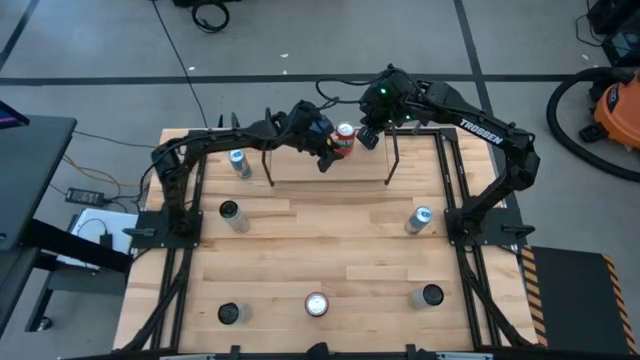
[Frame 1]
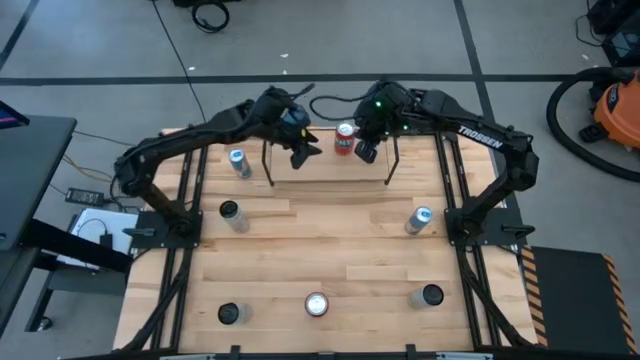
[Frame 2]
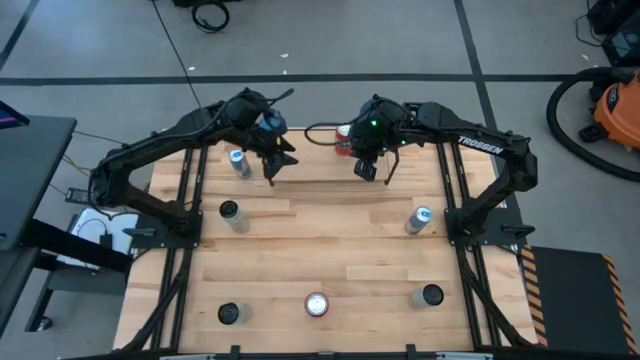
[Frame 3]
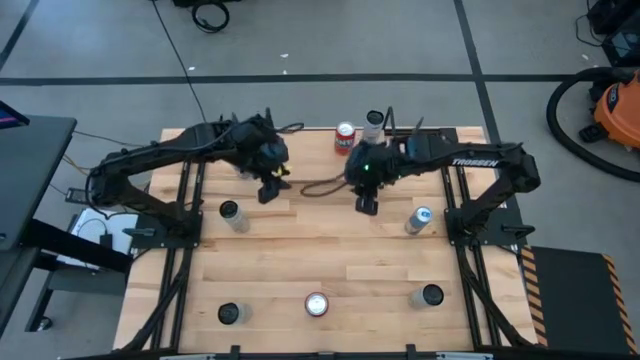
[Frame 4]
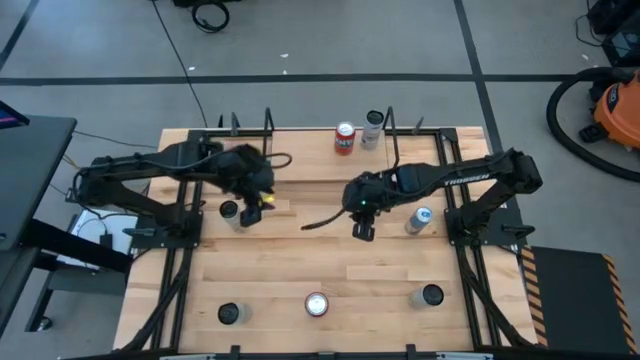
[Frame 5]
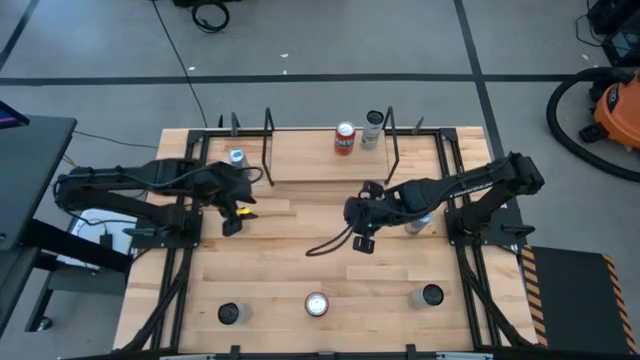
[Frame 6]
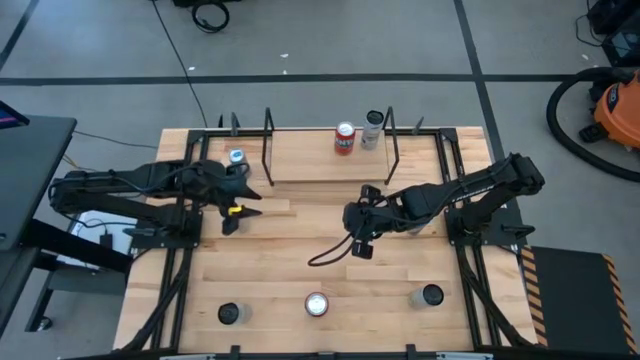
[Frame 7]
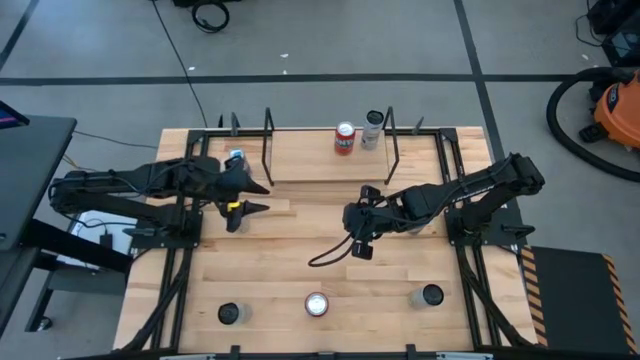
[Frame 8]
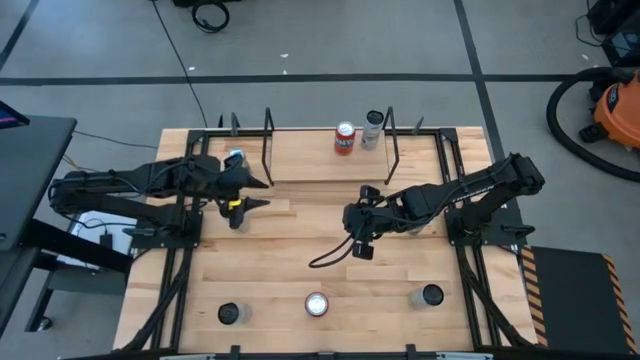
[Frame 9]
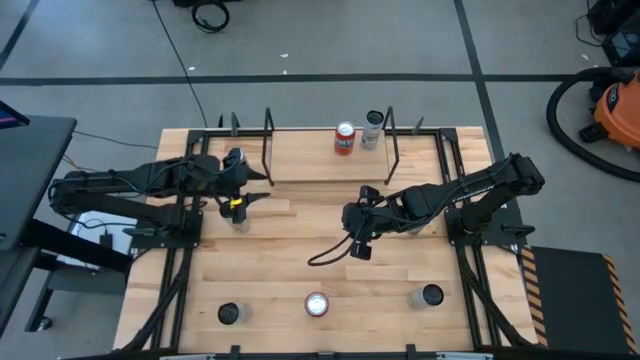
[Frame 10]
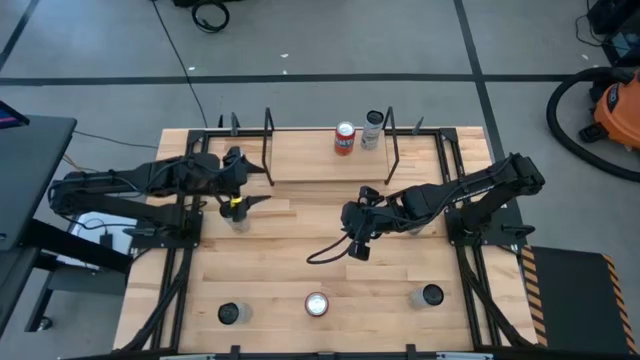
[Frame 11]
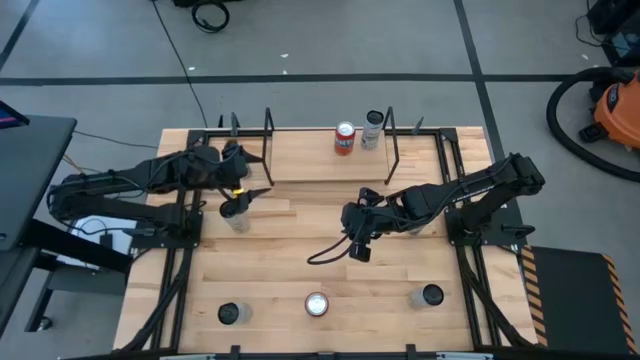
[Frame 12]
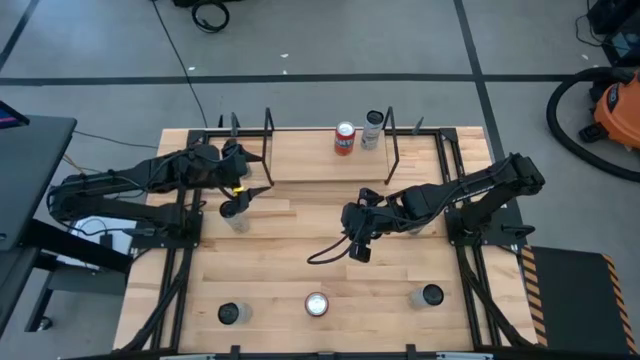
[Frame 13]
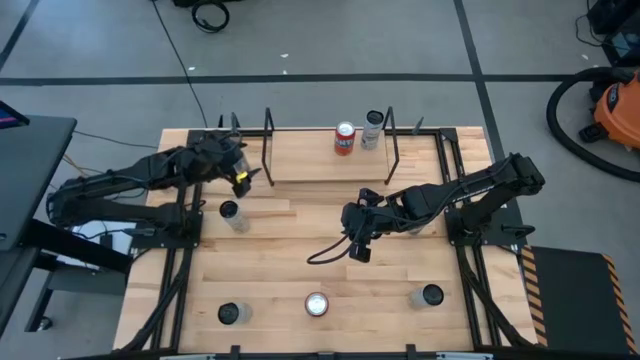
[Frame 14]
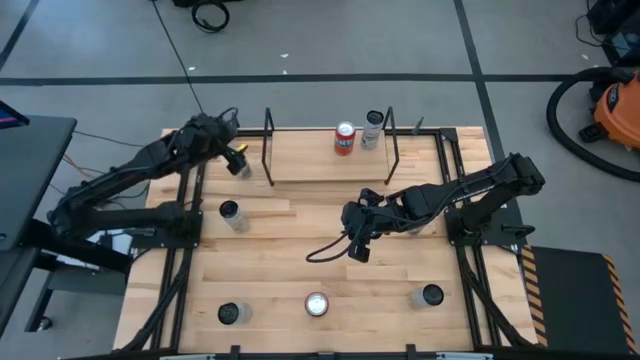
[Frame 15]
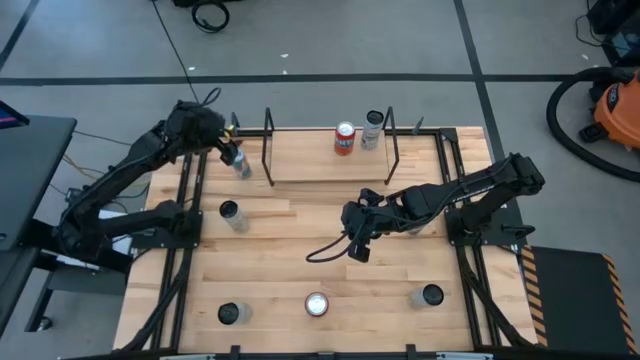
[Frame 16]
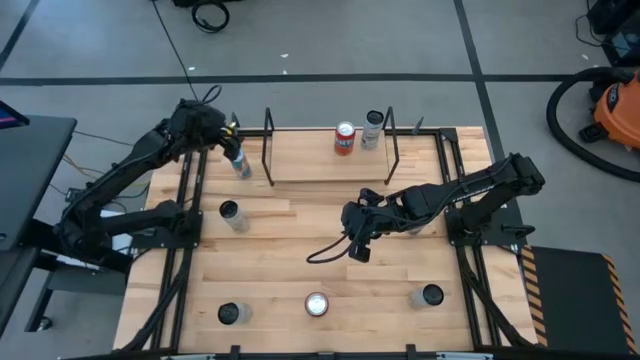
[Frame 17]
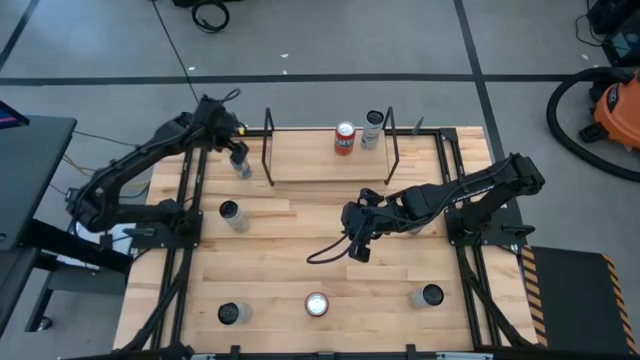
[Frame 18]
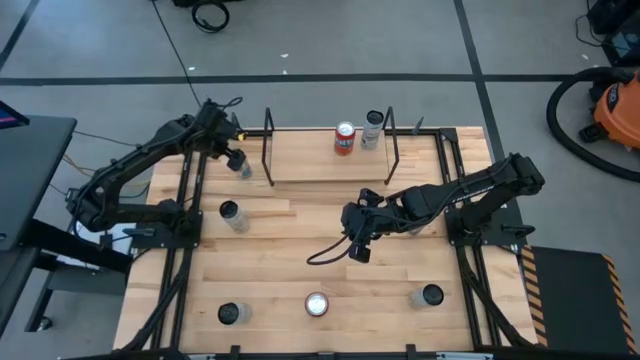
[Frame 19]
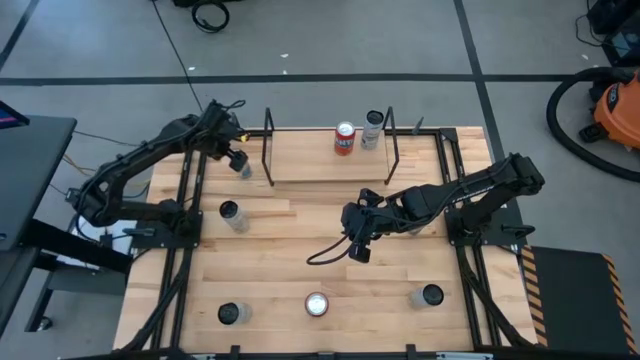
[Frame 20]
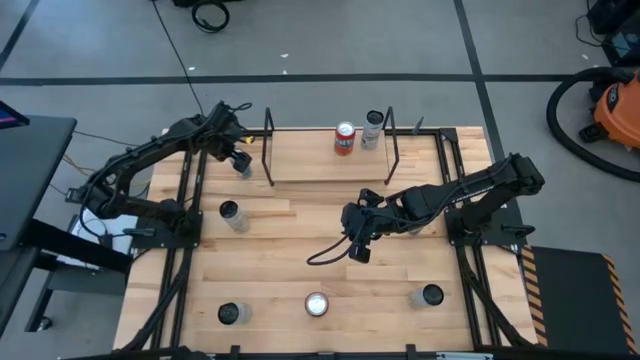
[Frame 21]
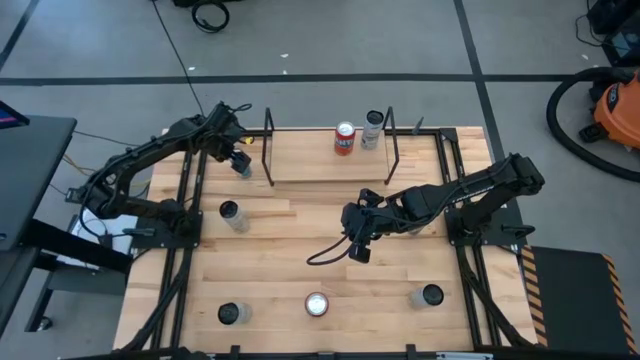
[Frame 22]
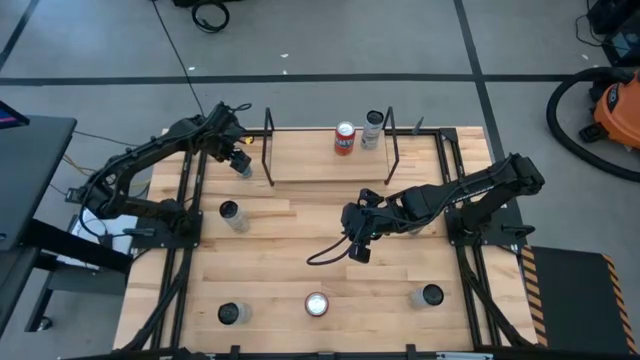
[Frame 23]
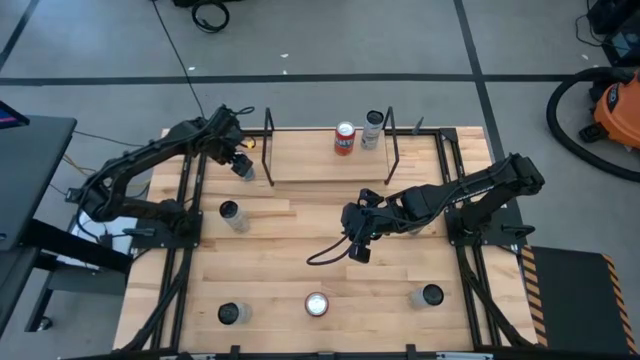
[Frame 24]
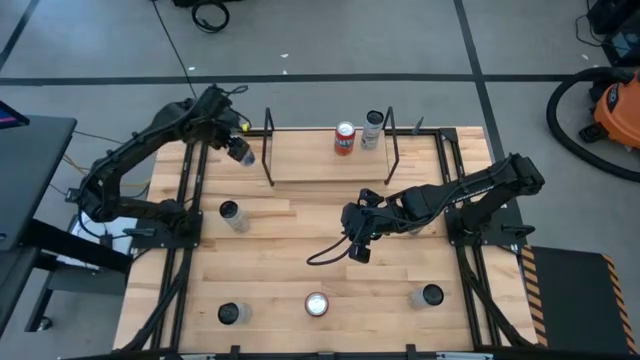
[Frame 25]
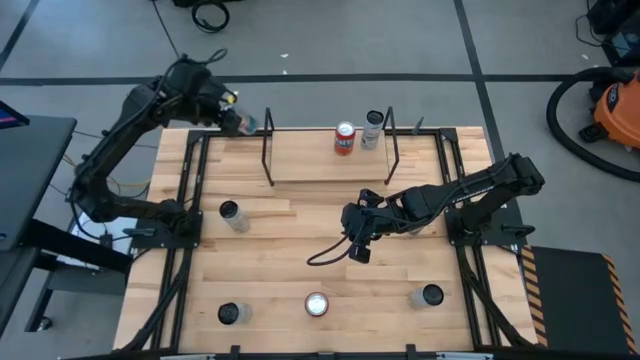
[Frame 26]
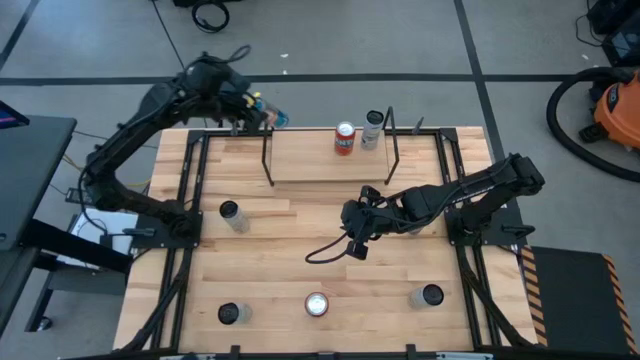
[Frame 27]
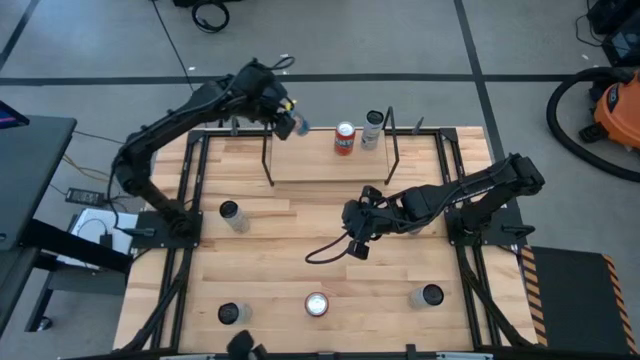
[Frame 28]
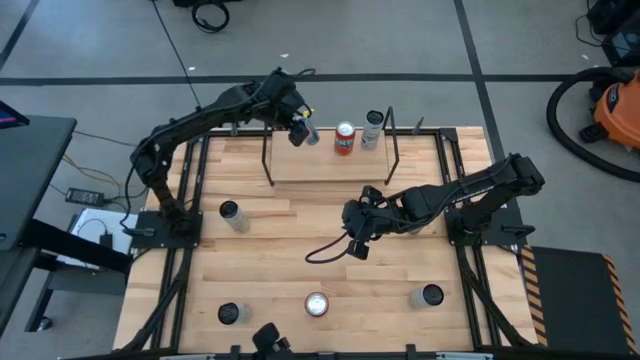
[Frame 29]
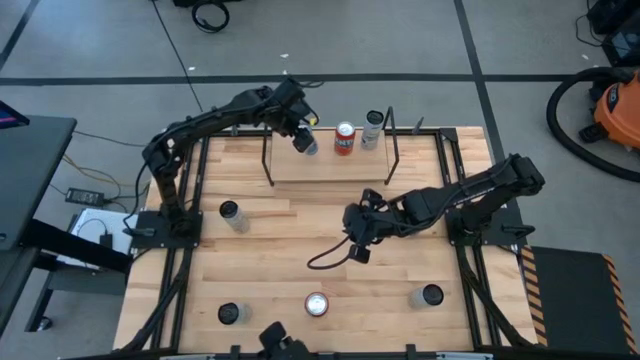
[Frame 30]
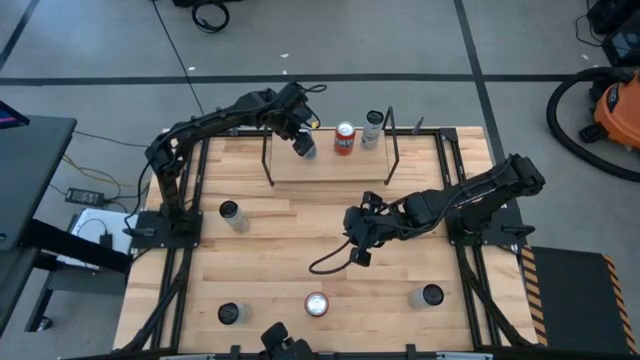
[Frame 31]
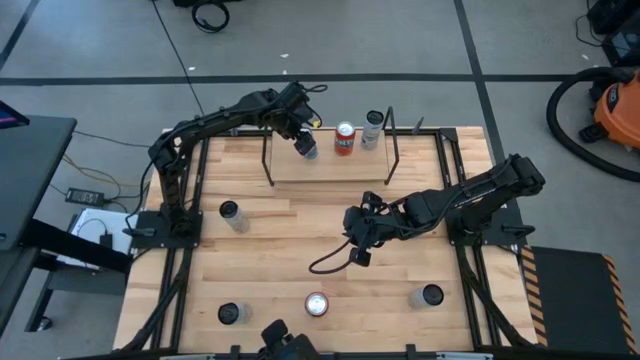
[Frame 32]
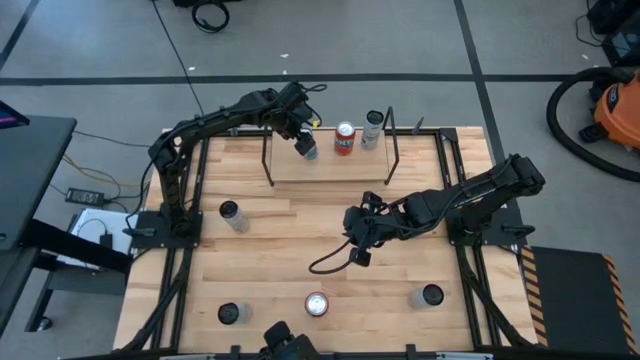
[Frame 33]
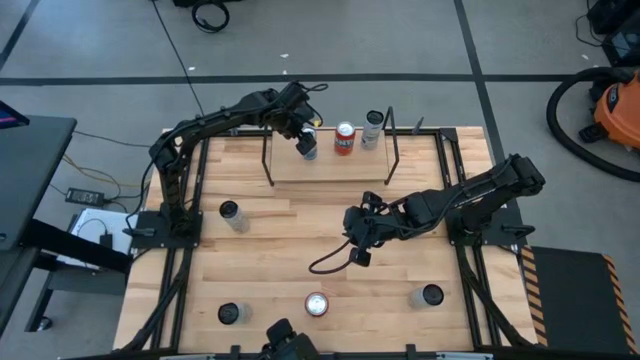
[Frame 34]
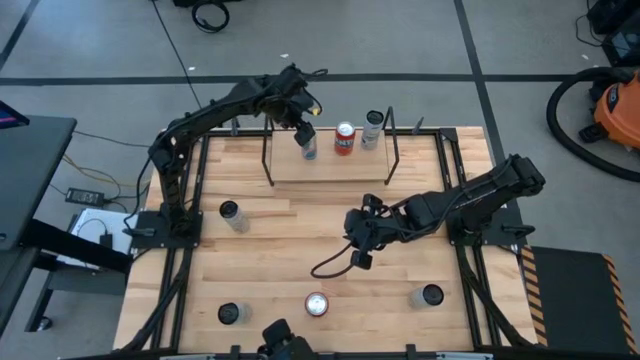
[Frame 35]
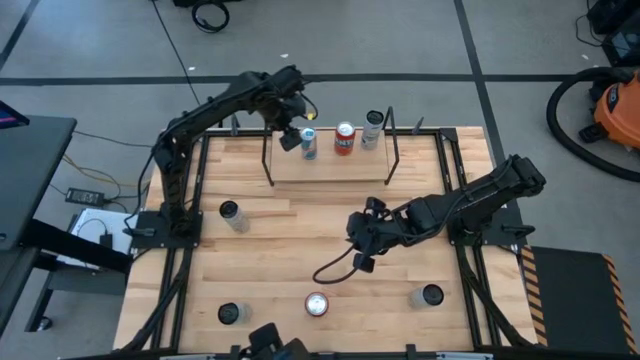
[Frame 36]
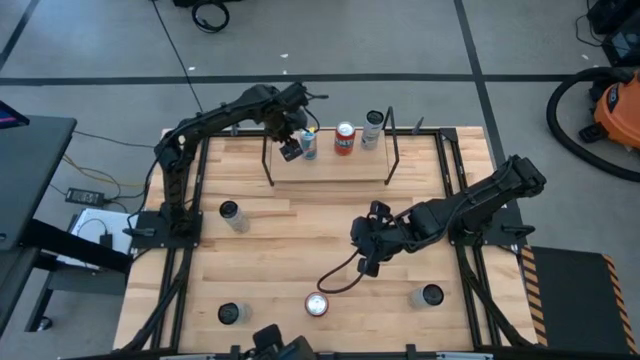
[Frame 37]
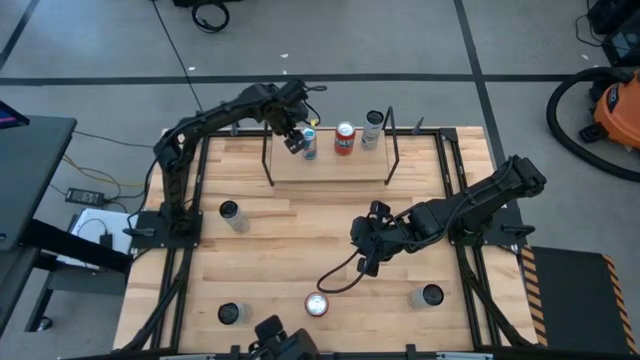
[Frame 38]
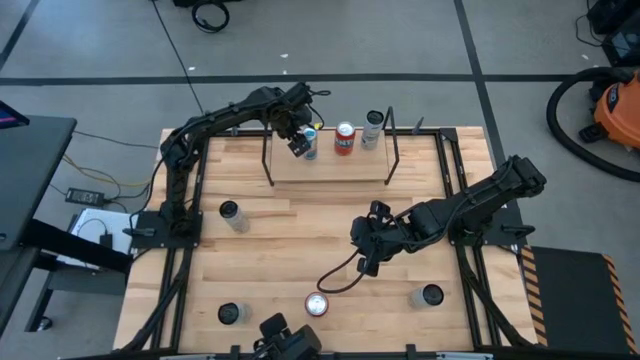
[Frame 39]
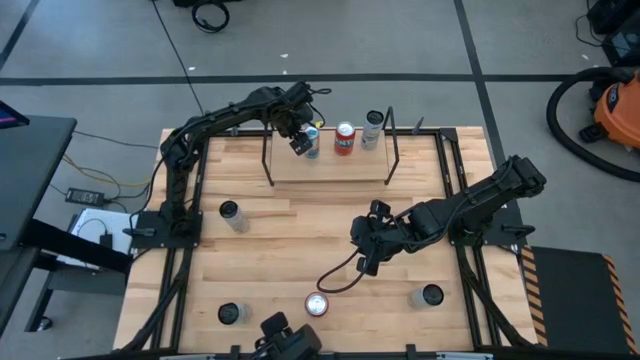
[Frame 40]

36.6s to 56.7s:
Task: Place canned beverage on shelf
Put the top blue soda can on the shelf
